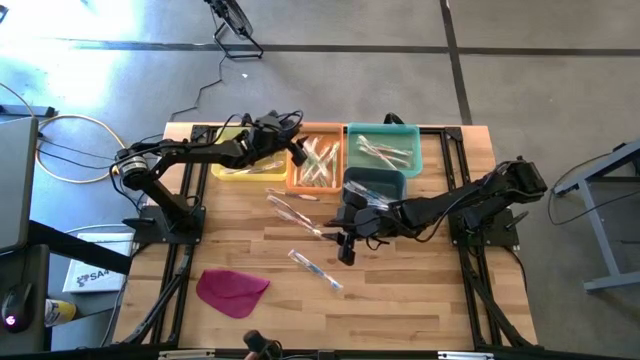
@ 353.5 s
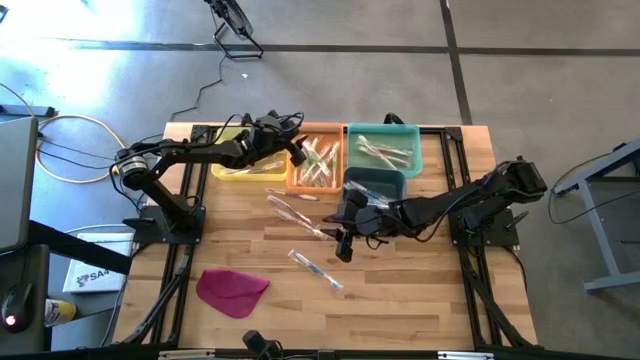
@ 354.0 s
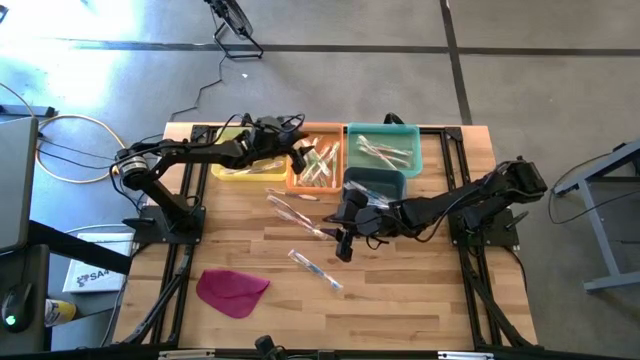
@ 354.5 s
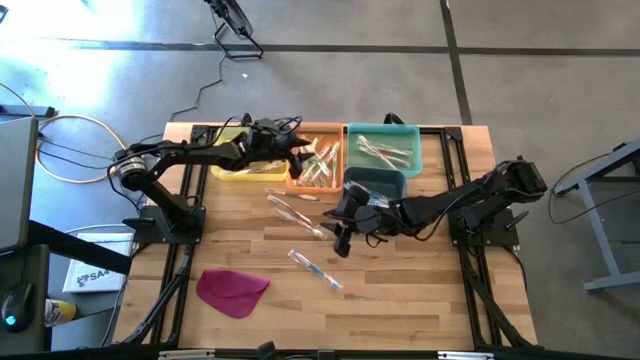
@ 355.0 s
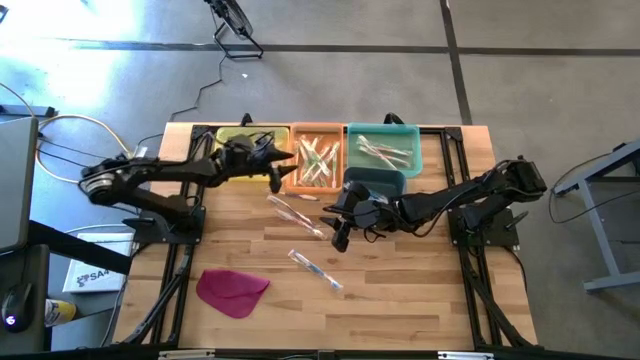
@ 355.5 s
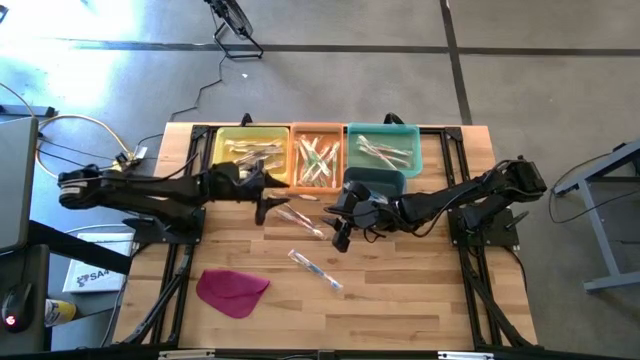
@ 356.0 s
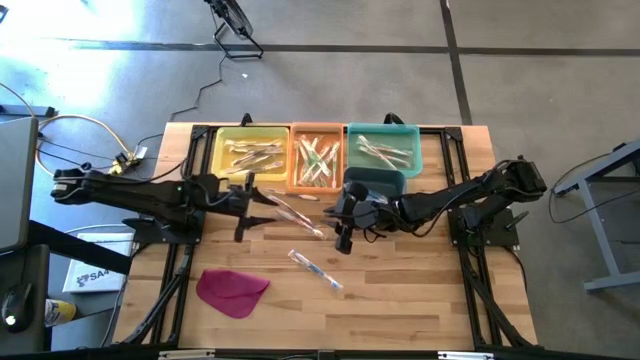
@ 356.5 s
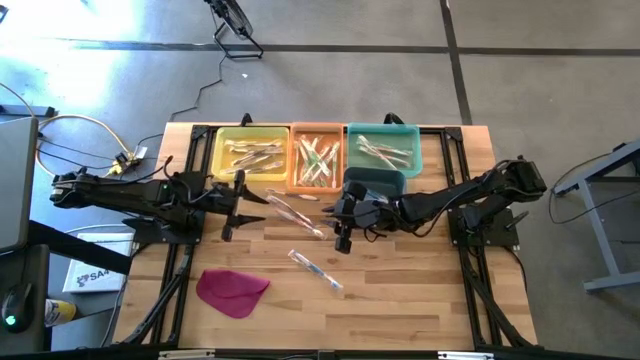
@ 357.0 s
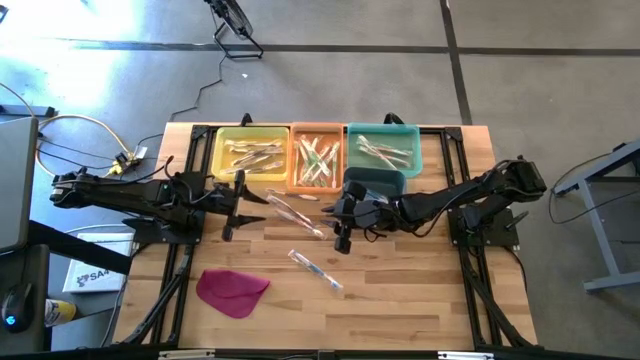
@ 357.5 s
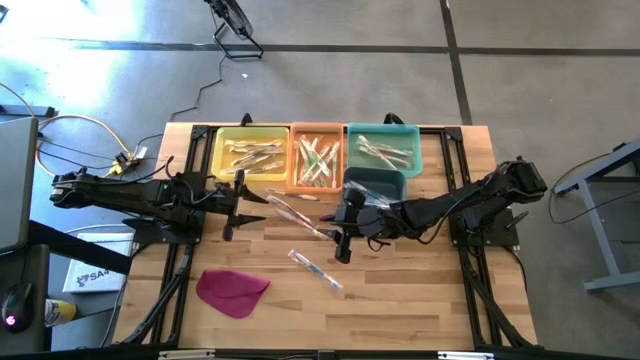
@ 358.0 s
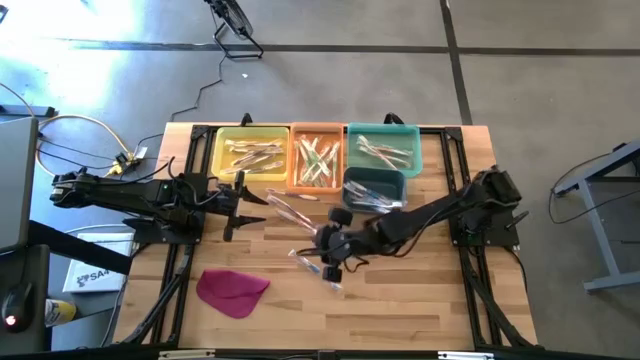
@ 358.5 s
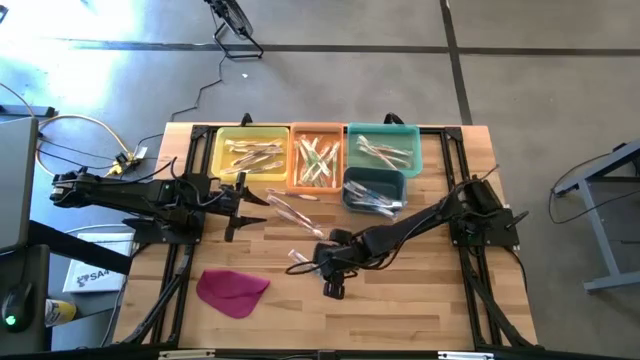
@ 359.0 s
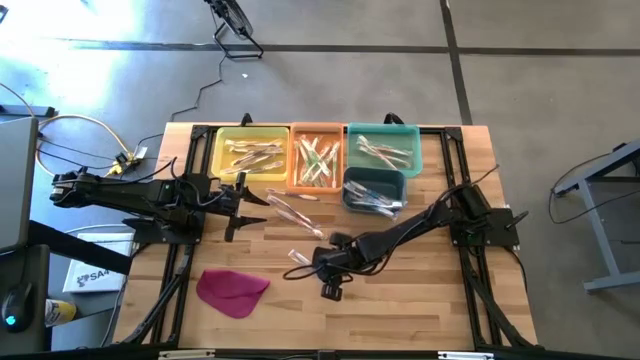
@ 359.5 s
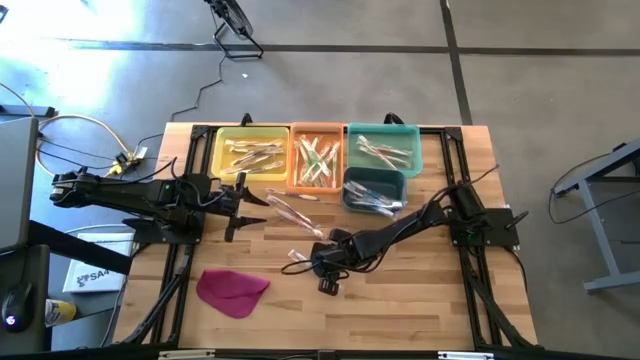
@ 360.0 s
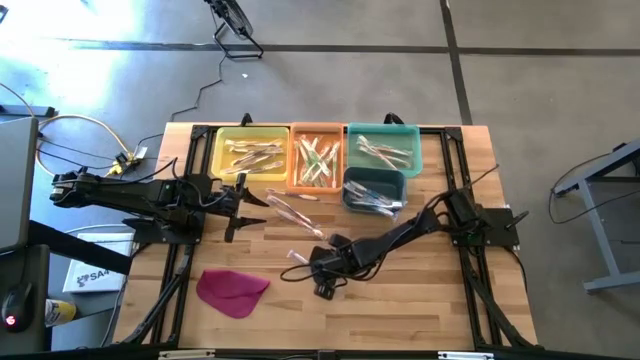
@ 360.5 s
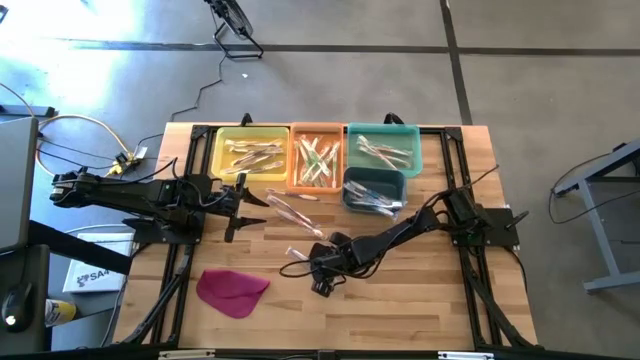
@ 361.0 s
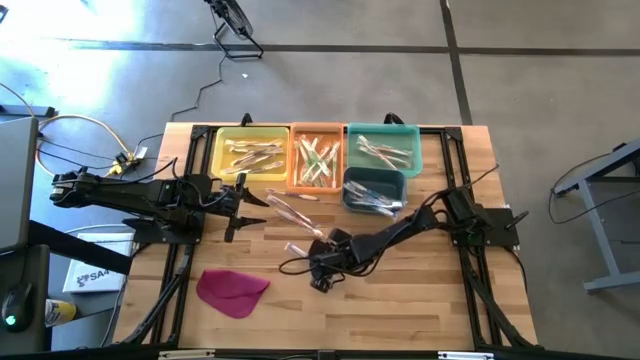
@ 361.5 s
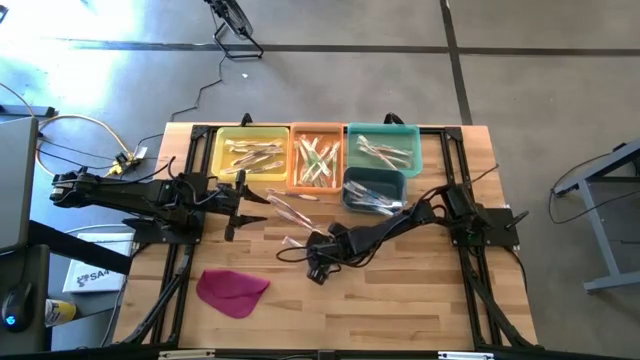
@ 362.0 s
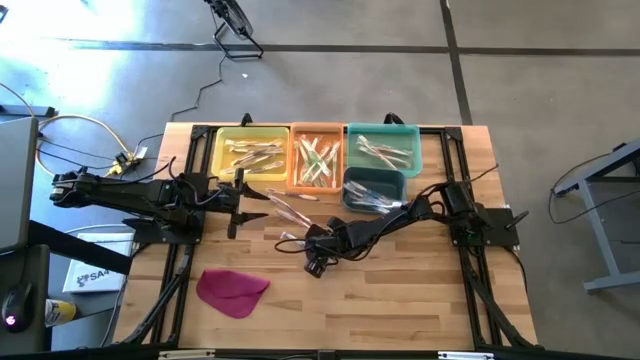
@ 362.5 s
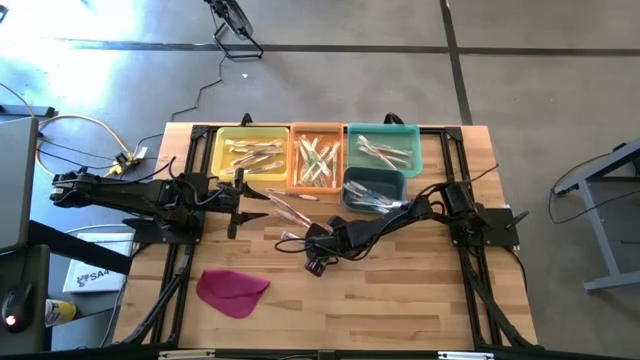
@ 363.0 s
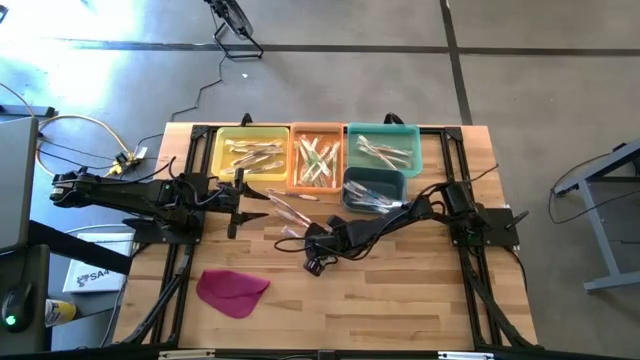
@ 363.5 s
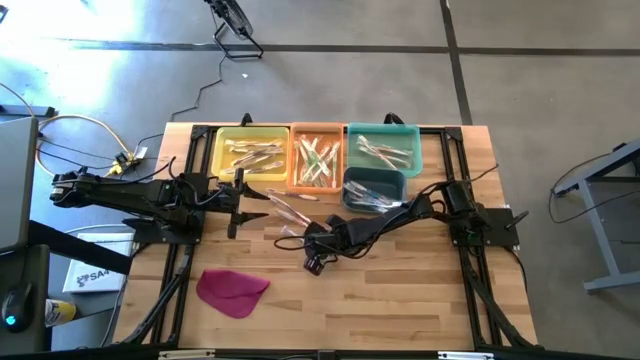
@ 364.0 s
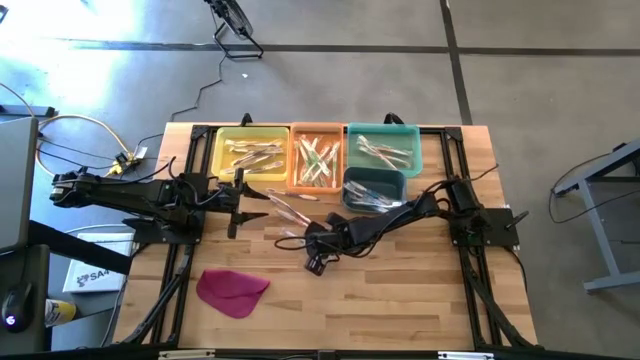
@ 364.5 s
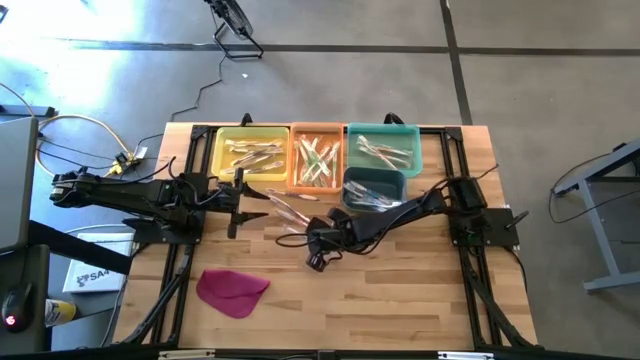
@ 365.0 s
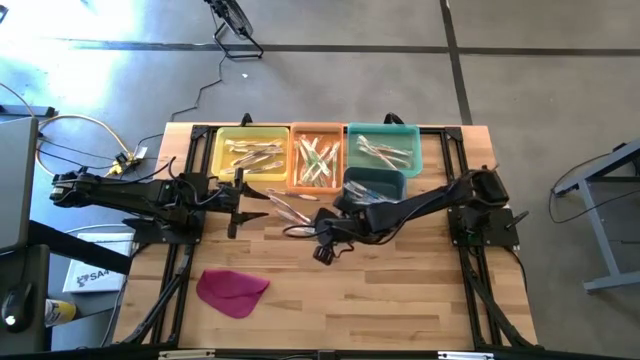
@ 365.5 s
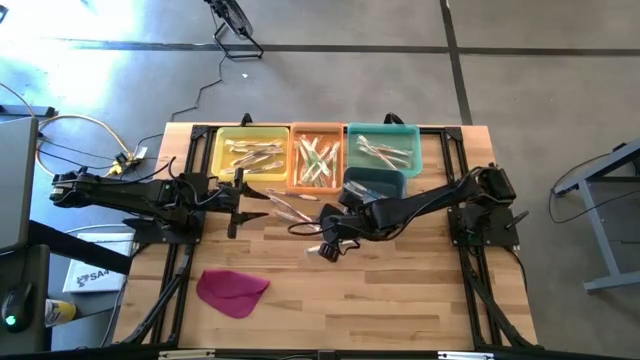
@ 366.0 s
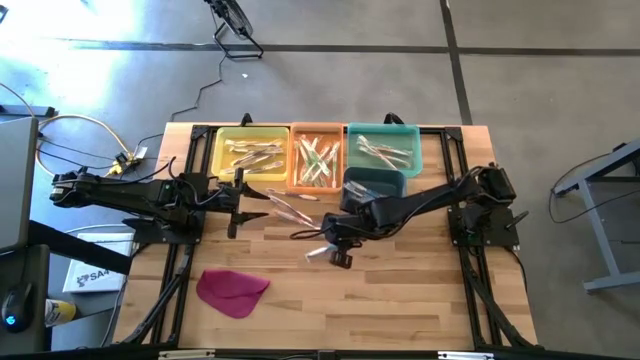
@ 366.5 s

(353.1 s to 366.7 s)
Task: Pick & Place Toothbrushes
Put the blue toothbrush into the dark blue bin

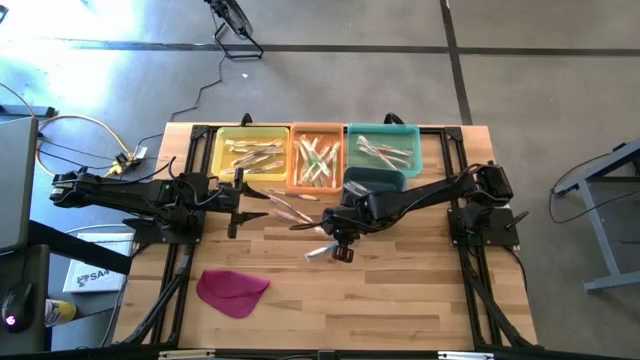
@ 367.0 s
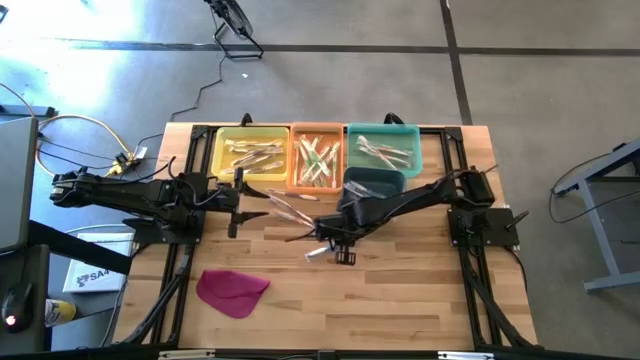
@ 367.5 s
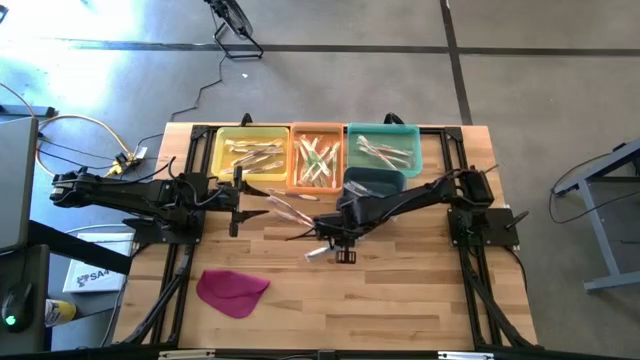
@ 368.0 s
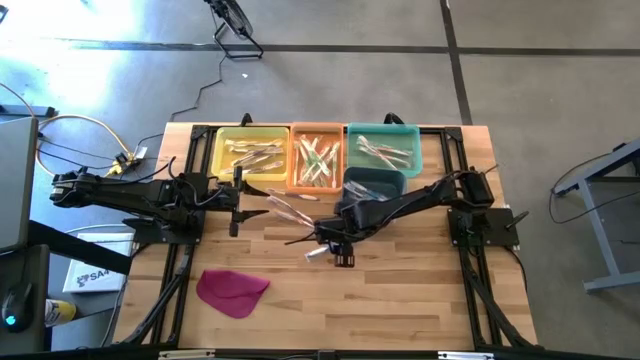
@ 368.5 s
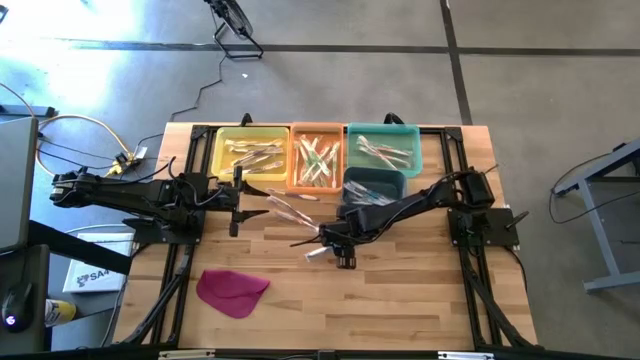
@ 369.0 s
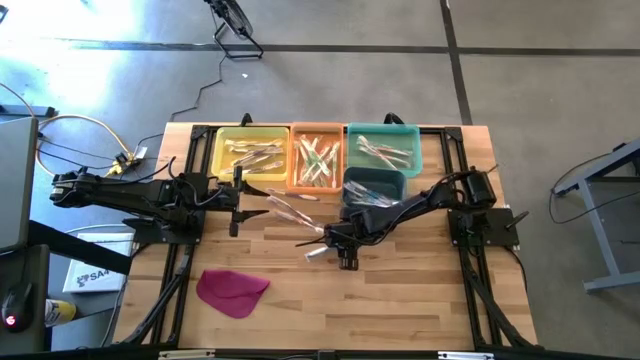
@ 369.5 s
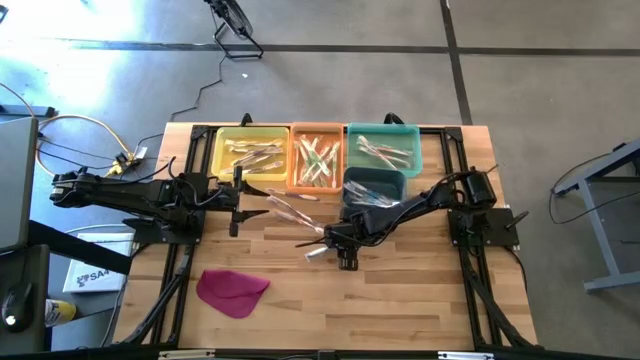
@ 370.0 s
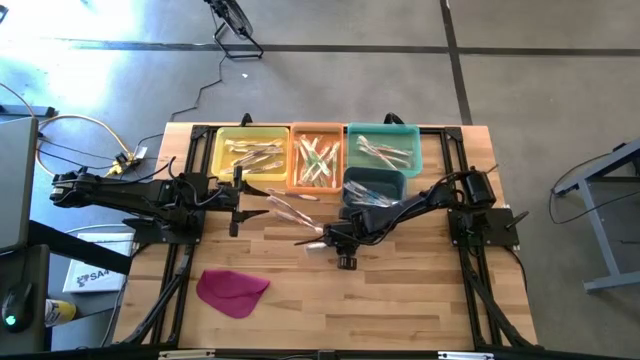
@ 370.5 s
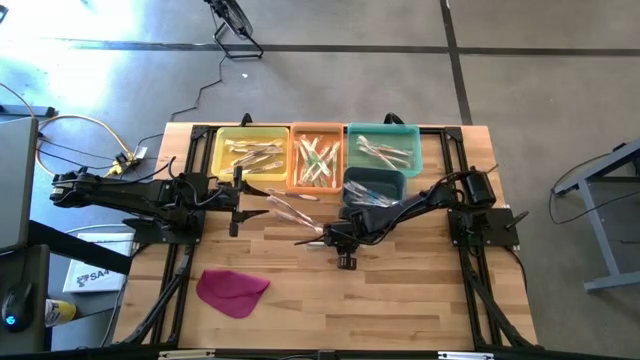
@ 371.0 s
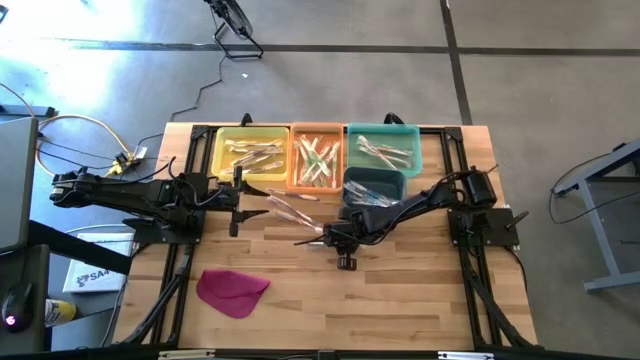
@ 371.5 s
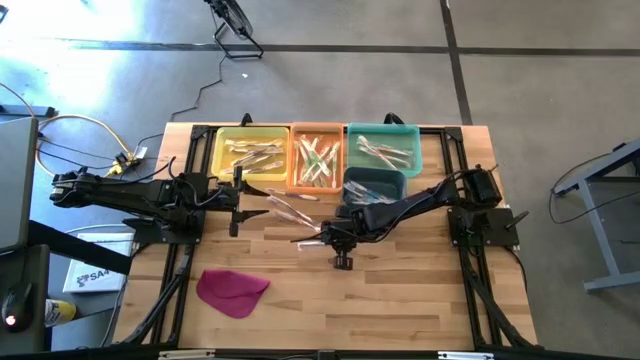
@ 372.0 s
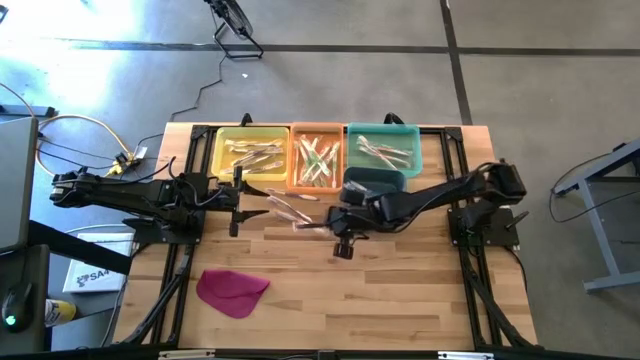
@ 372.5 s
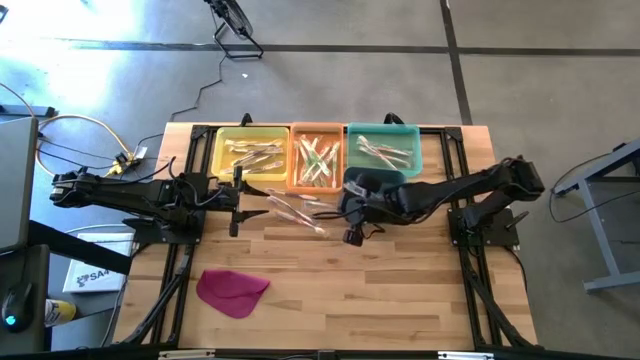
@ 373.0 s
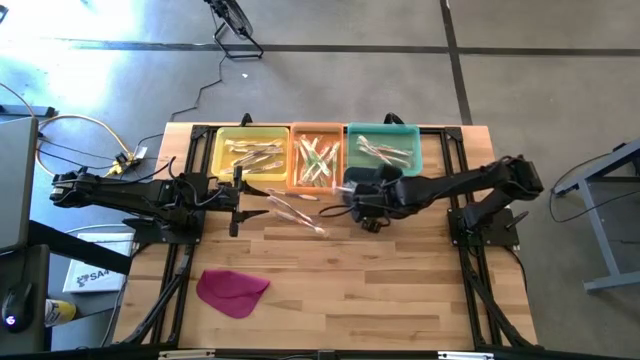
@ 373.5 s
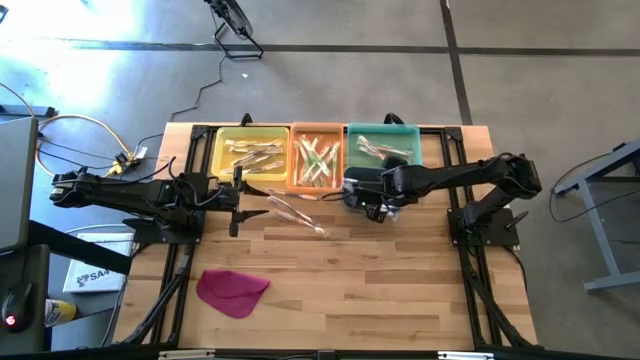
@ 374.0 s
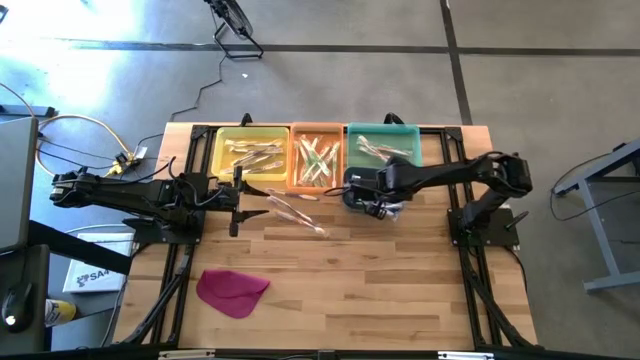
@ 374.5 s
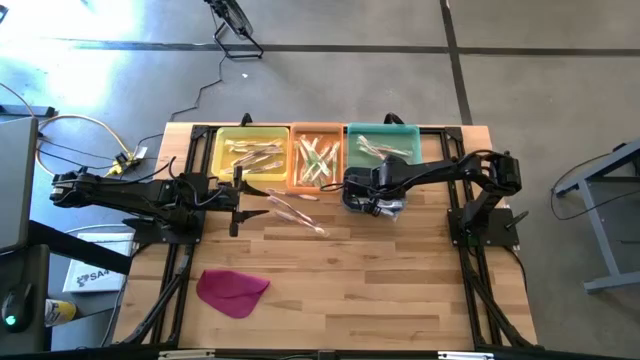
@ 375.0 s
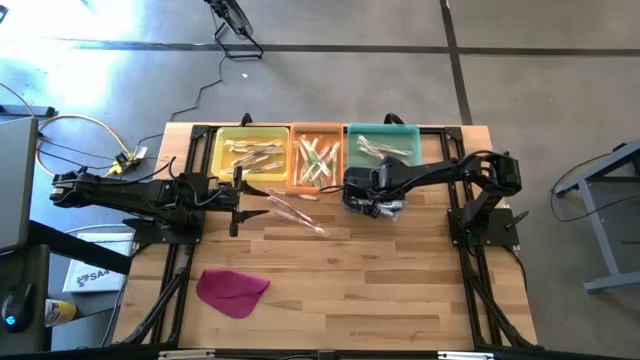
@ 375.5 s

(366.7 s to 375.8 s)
Put the blue toothbrush into the dark blue bin
